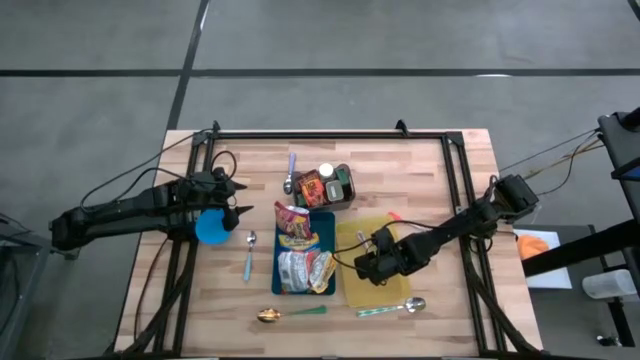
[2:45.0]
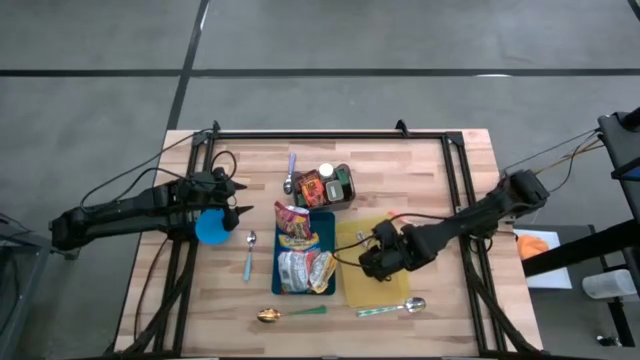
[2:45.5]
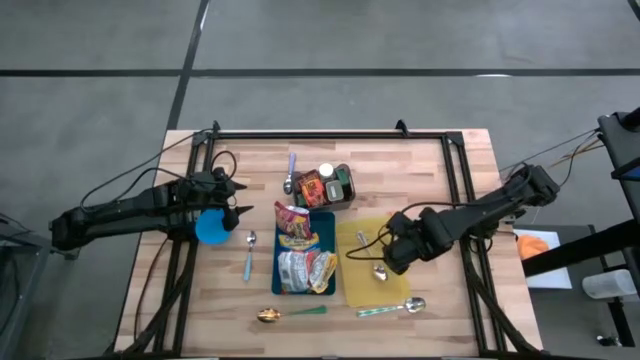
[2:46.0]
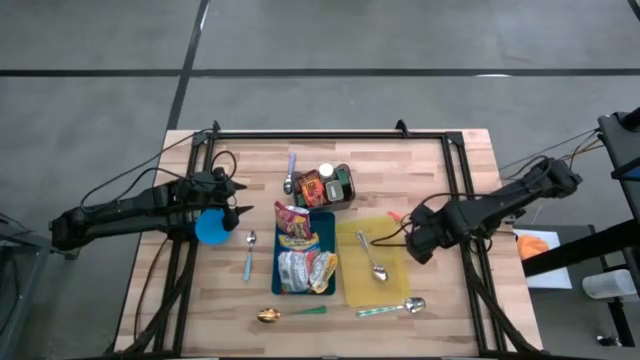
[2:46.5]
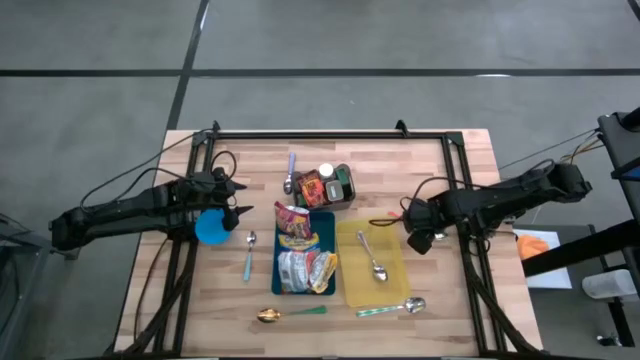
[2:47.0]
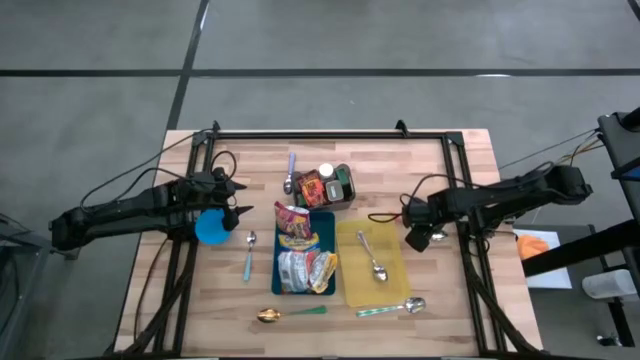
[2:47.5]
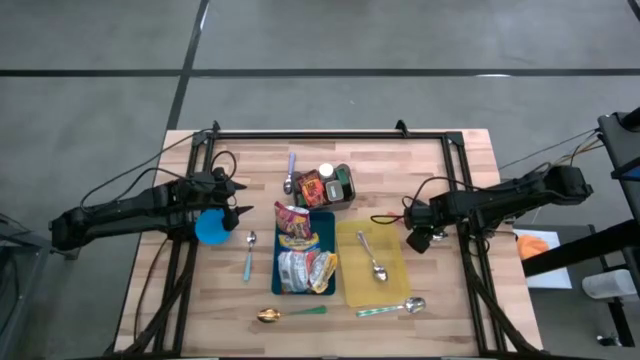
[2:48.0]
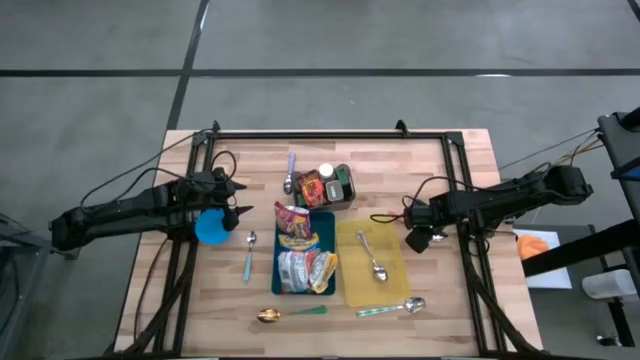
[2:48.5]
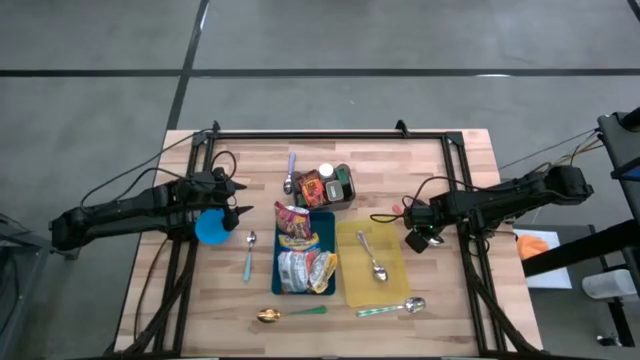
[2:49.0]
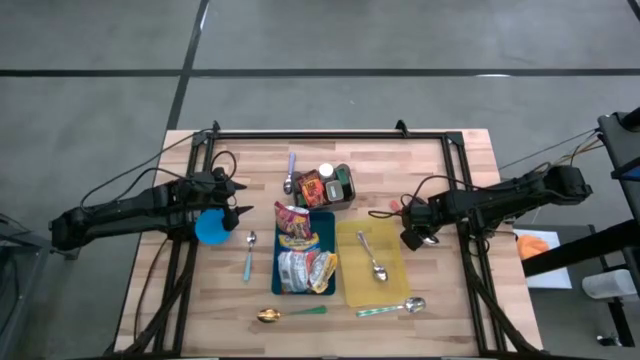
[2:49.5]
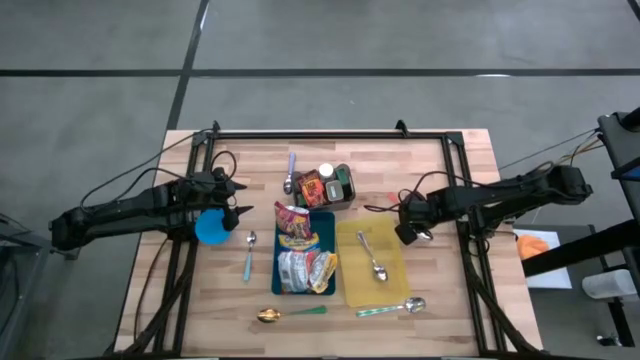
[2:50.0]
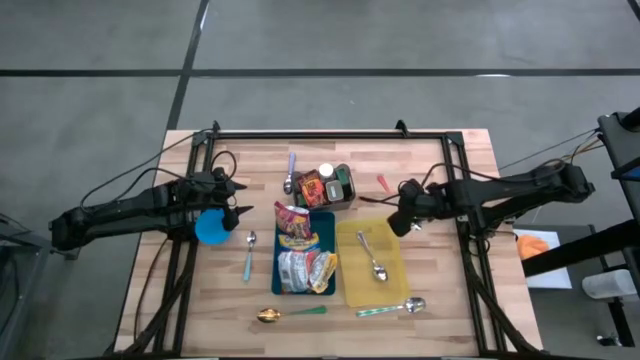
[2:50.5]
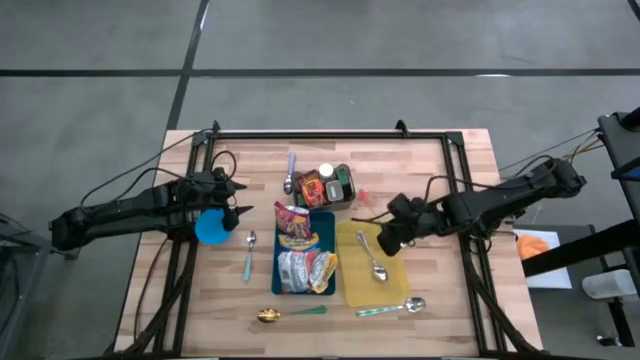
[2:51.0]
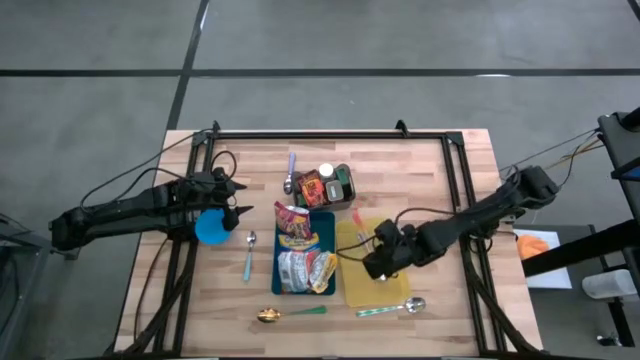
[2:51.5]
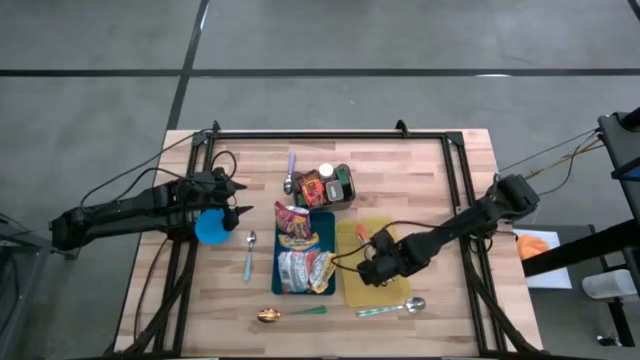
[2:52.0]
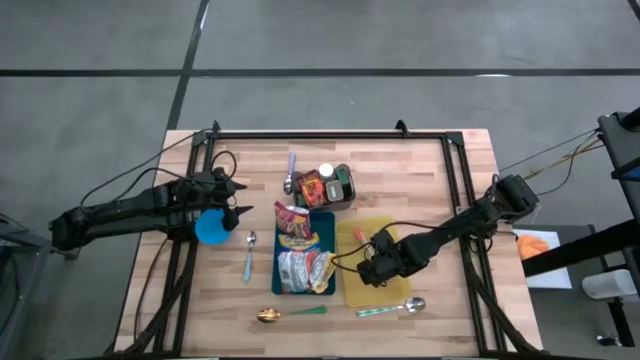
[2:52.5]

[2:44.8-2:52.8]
Put the orange spoon into the yellow bin

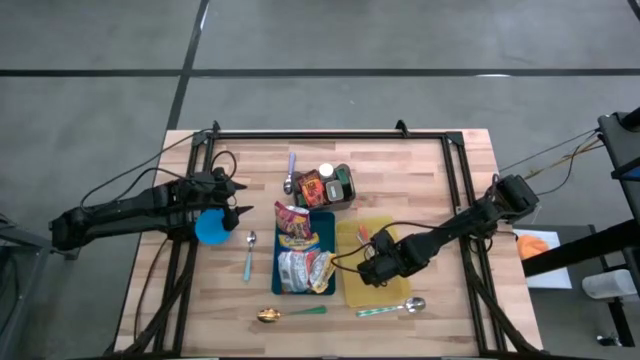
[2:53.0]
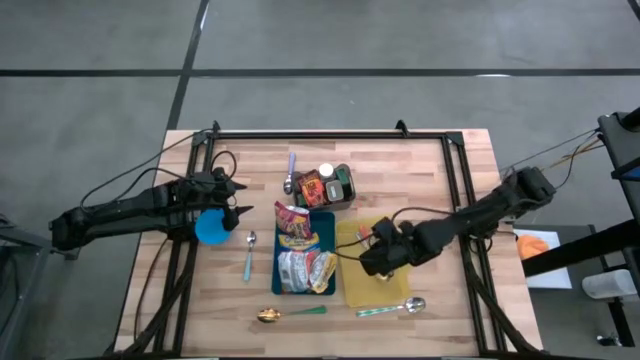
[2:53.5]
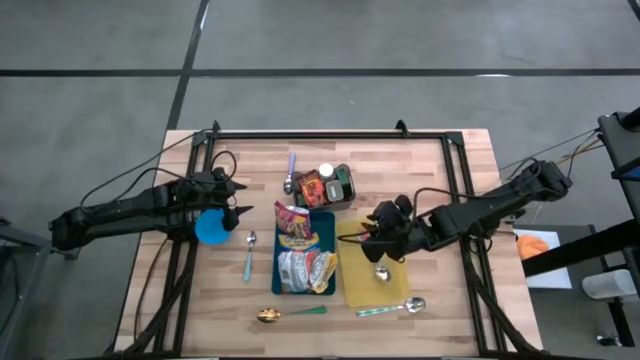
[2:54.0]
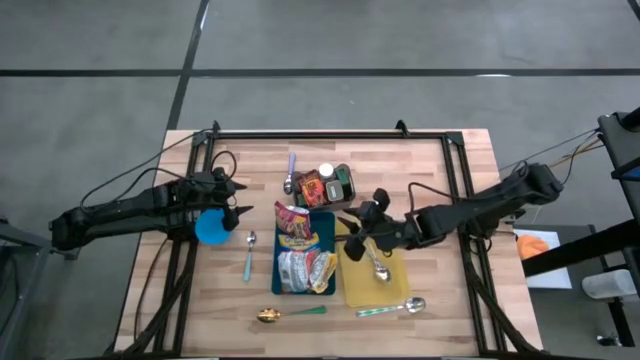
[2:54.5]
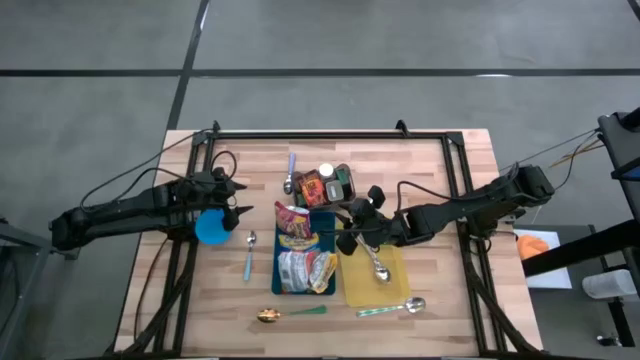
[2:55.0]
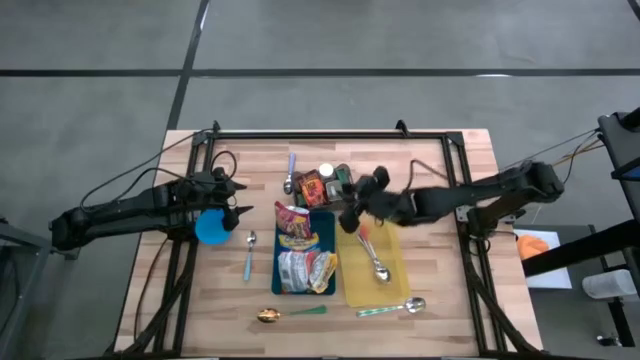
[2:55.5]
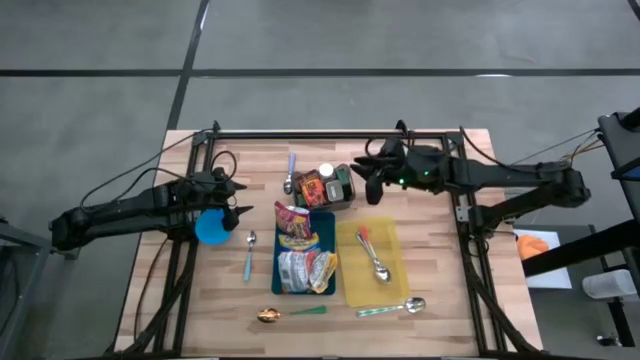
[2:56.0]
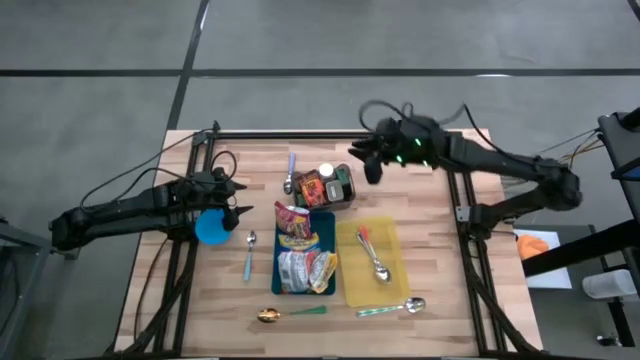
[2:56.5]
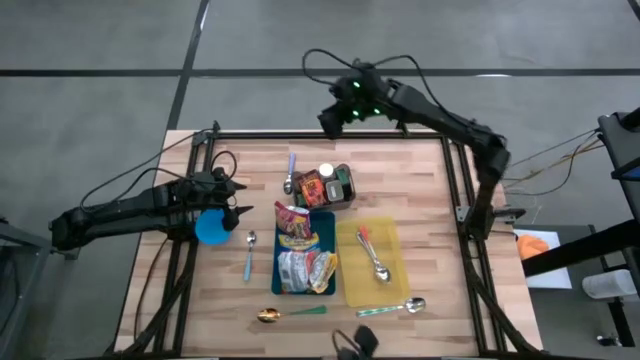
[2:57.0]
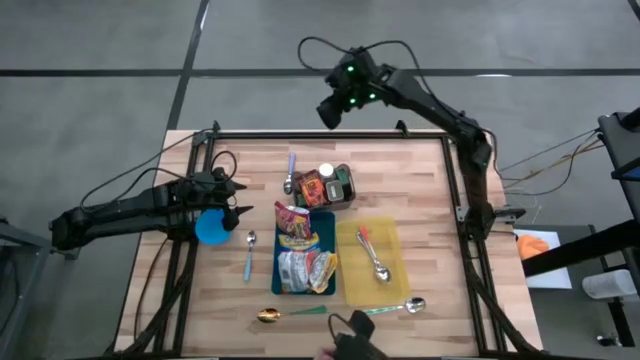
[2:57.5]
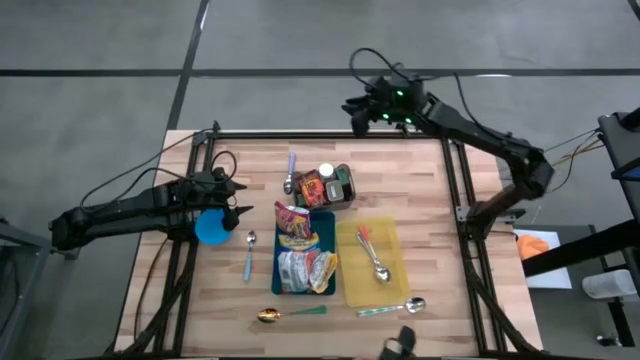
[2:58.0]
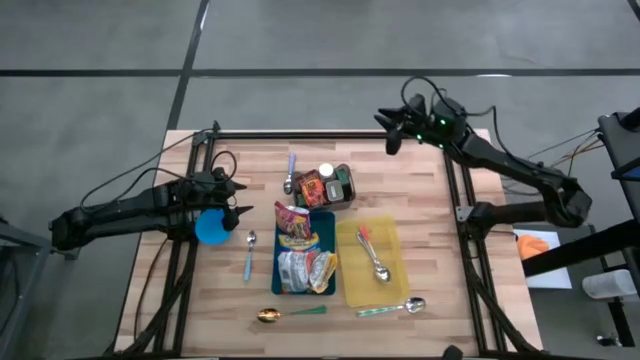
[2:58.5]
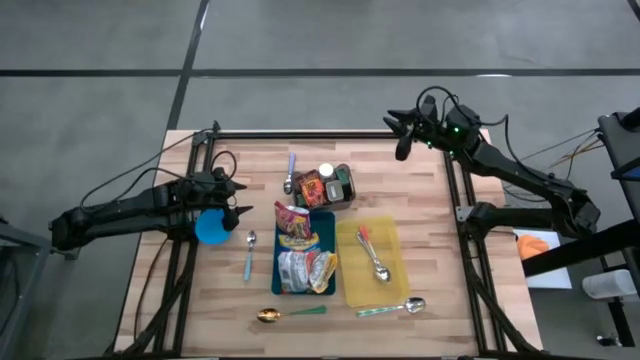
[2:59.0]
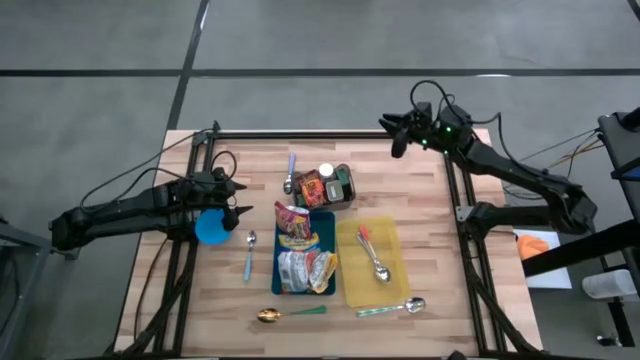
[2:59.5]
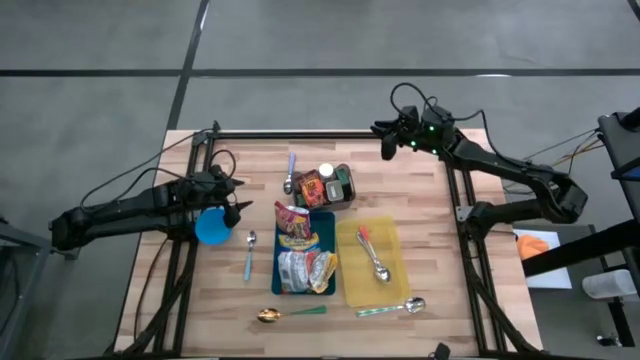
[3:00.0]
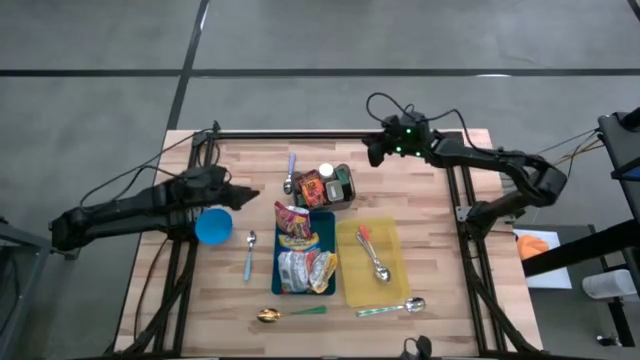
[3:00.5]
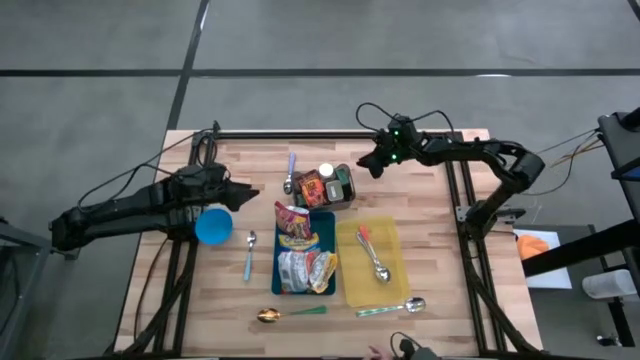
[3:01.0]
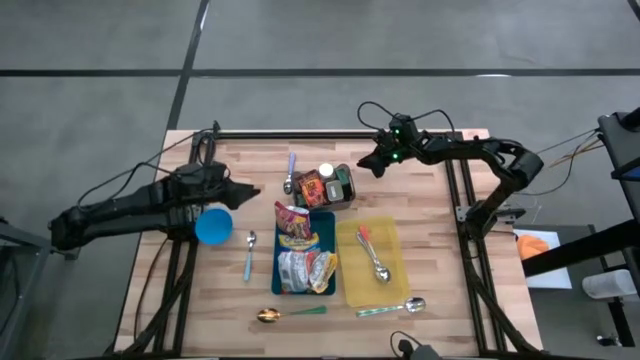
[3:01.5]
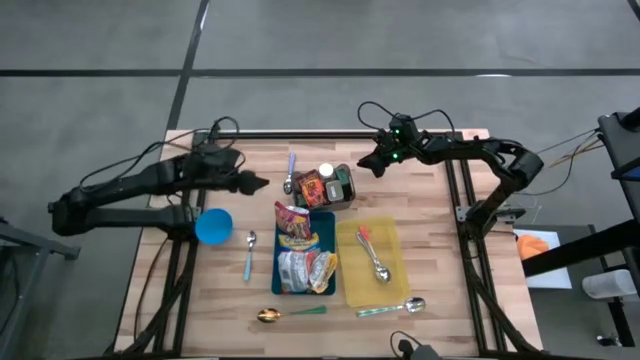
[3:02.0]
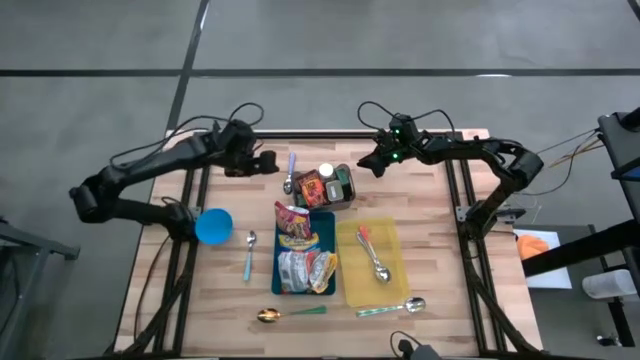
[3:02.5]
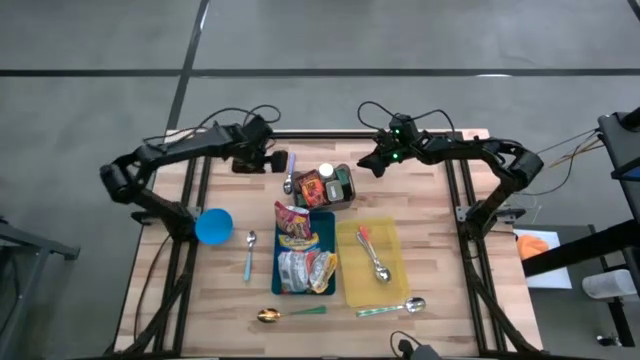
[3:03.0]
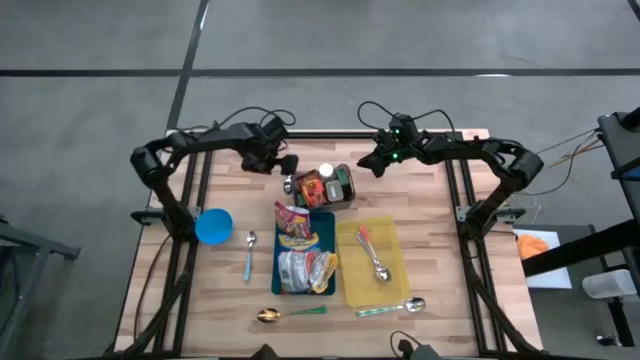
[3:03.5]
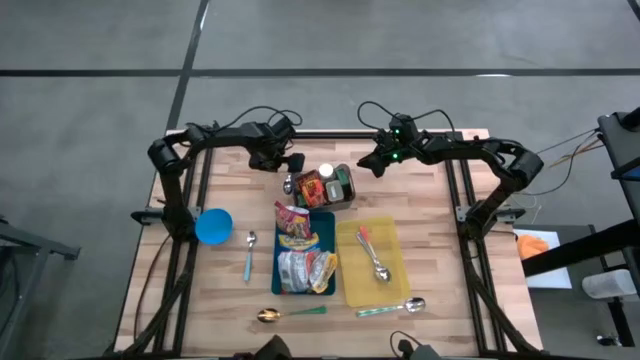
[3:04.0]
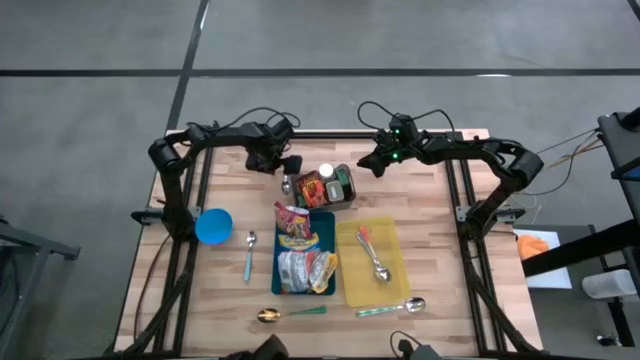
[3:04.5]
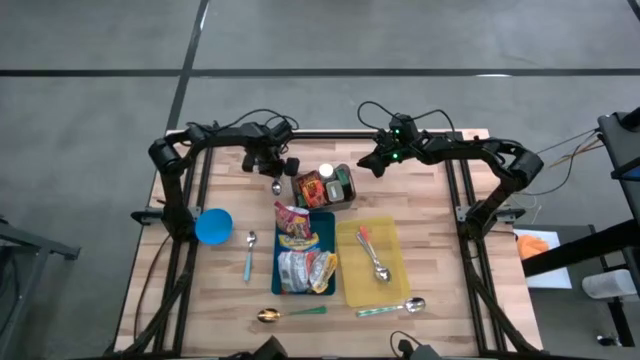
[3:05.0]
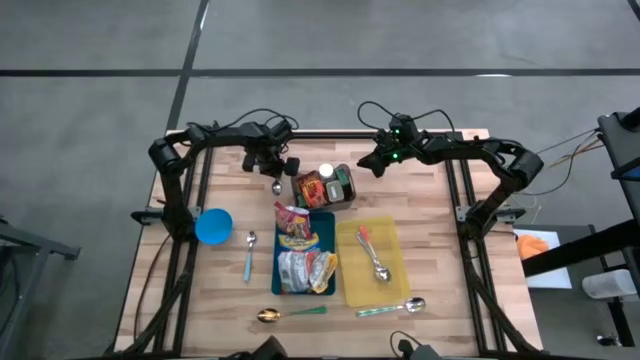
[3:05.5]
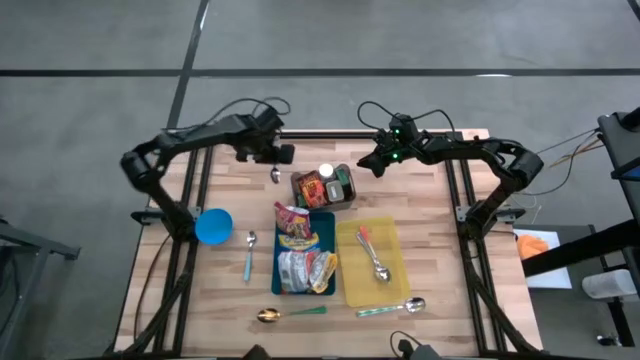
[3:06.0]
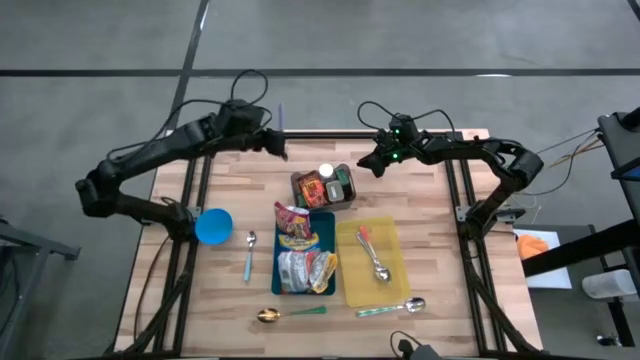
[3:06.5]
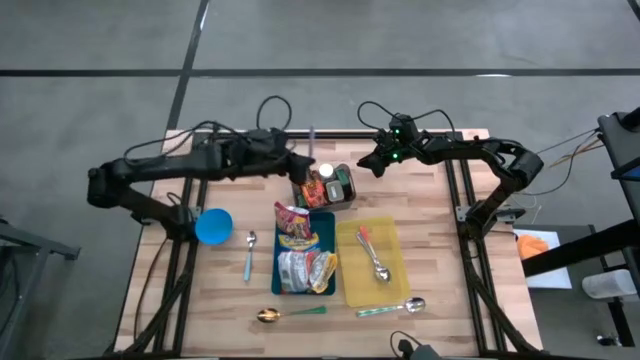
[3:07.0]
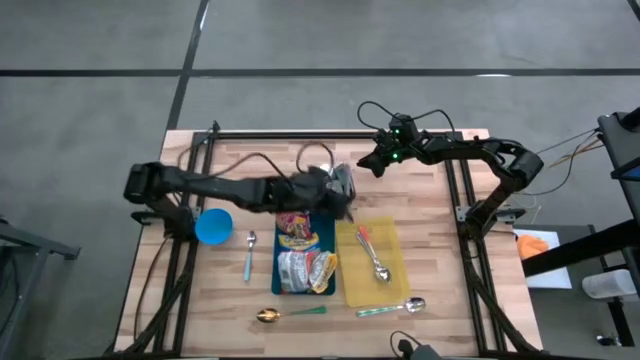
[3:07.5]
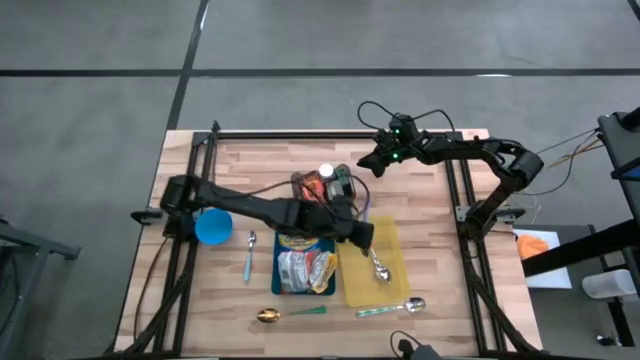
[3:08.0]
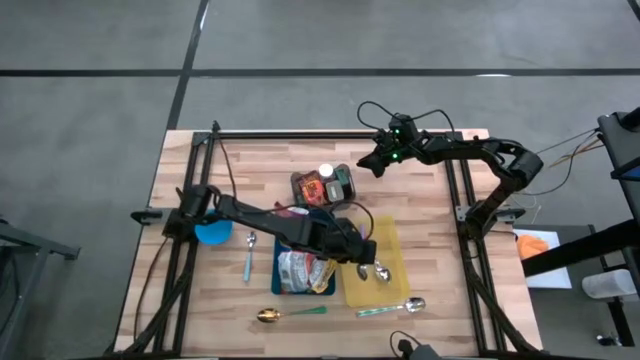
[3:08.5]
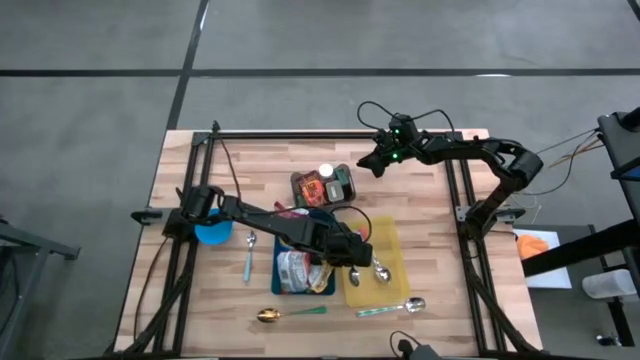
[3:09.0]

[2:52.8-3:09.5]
Put the light purple spoon into the yellow bin
